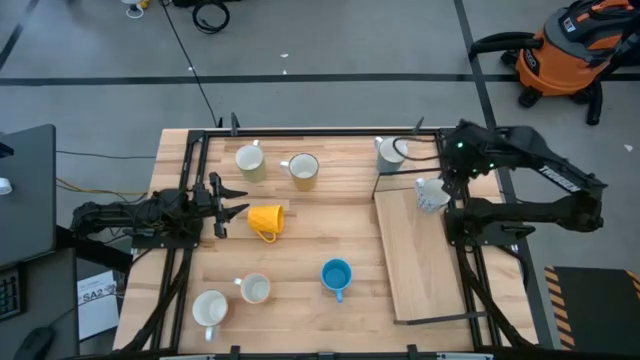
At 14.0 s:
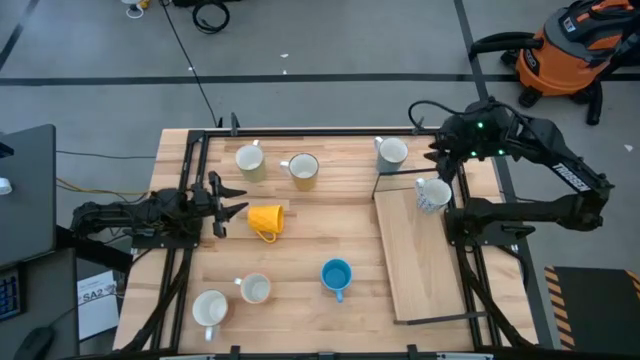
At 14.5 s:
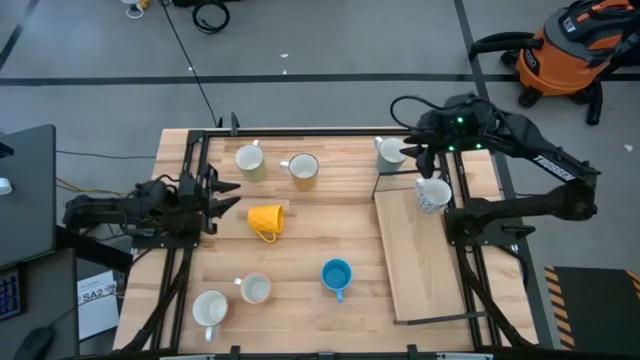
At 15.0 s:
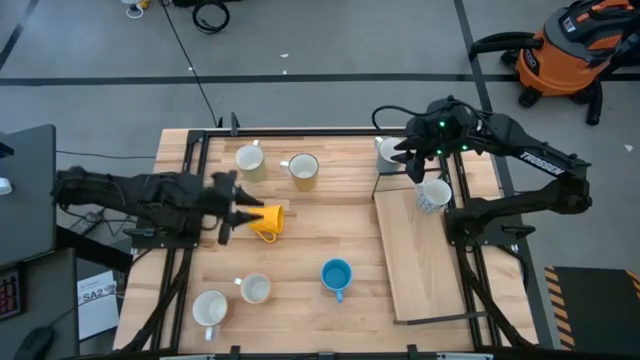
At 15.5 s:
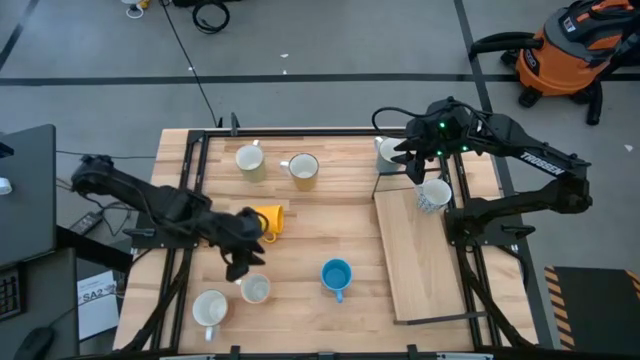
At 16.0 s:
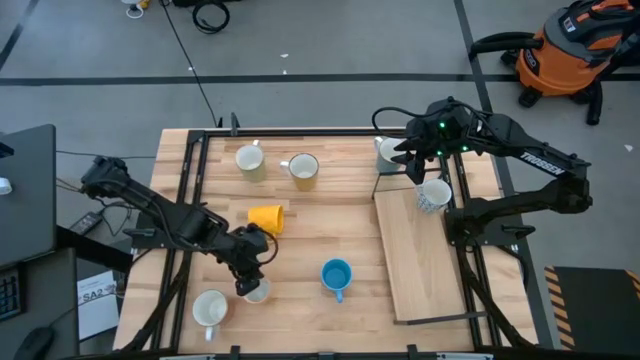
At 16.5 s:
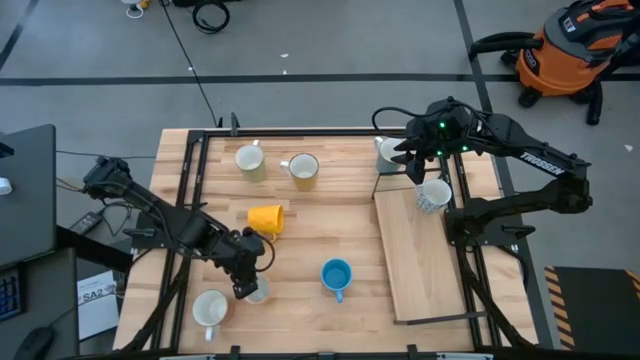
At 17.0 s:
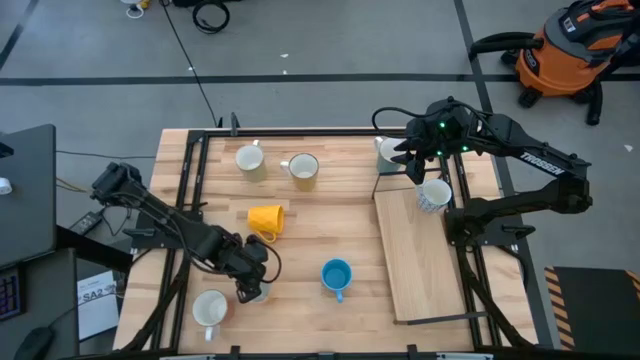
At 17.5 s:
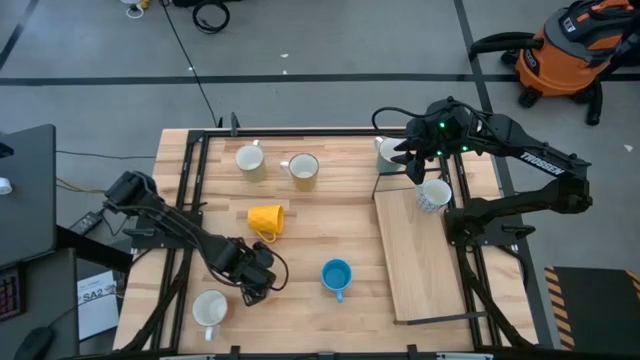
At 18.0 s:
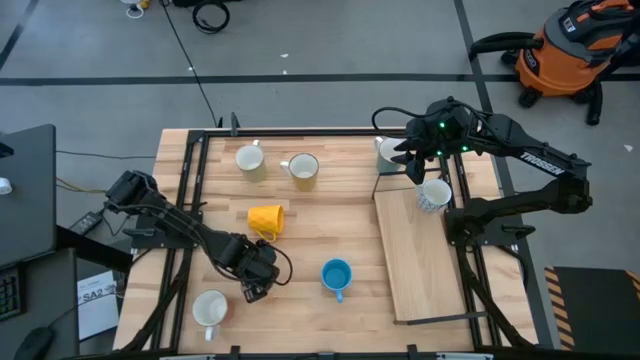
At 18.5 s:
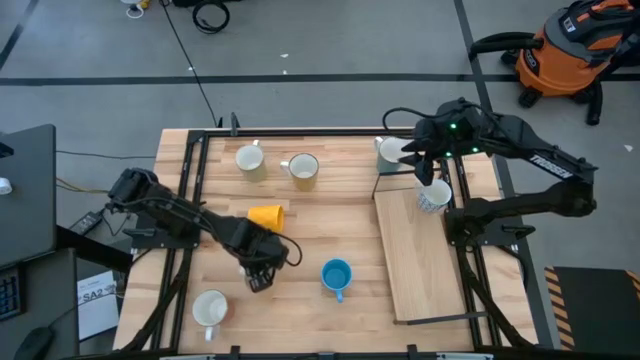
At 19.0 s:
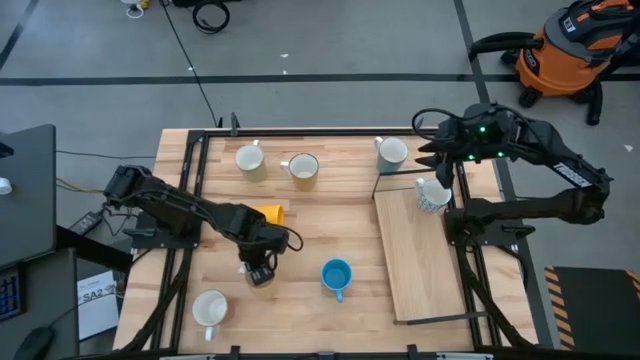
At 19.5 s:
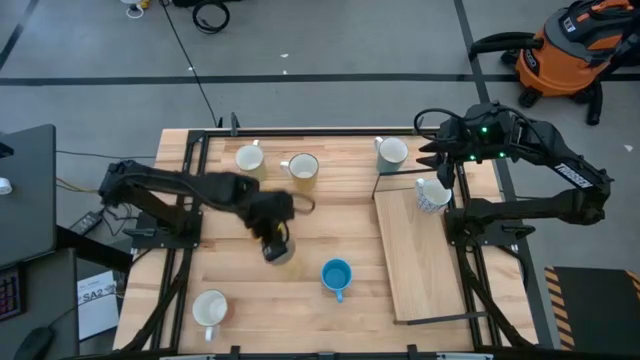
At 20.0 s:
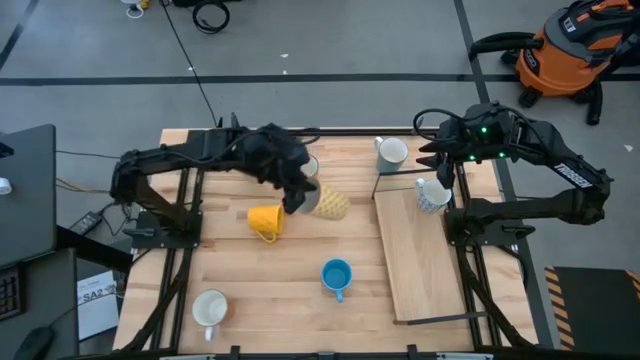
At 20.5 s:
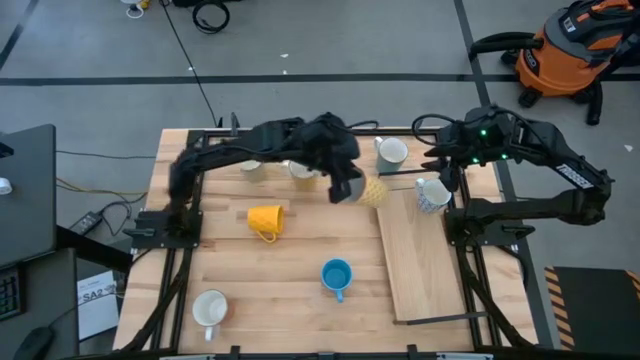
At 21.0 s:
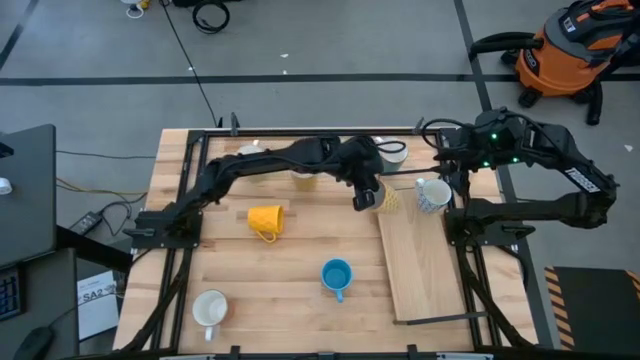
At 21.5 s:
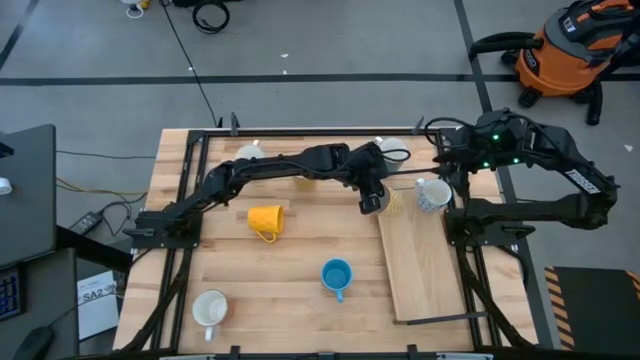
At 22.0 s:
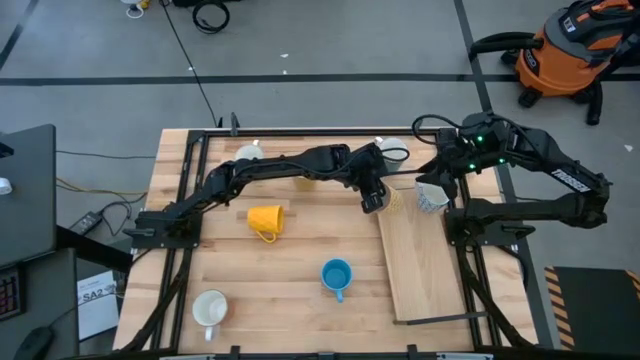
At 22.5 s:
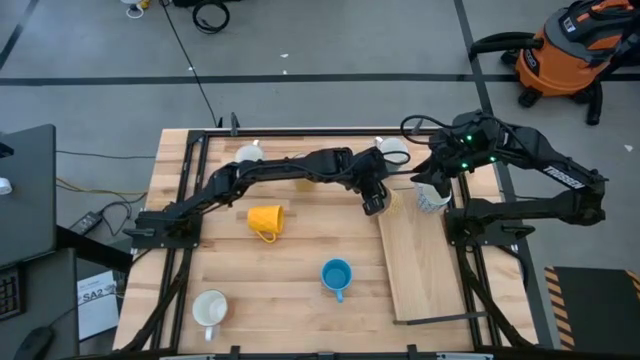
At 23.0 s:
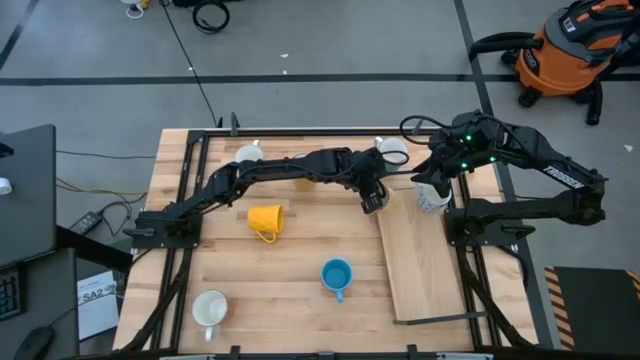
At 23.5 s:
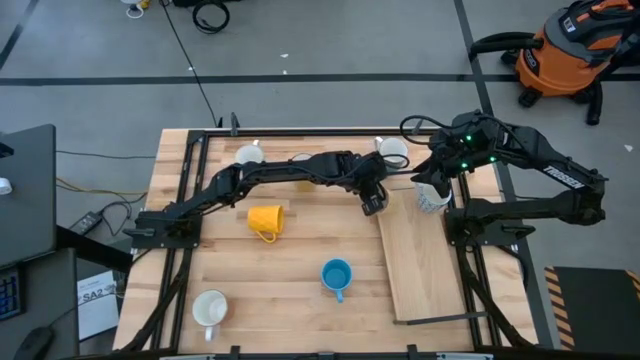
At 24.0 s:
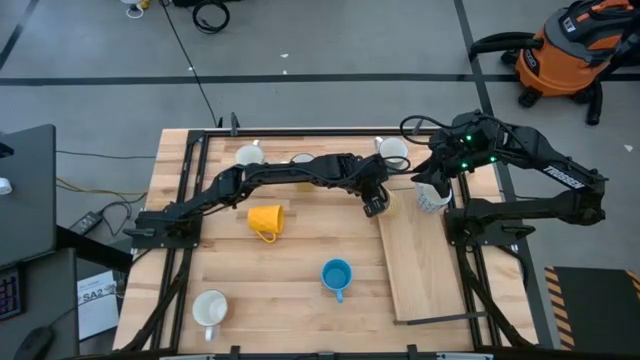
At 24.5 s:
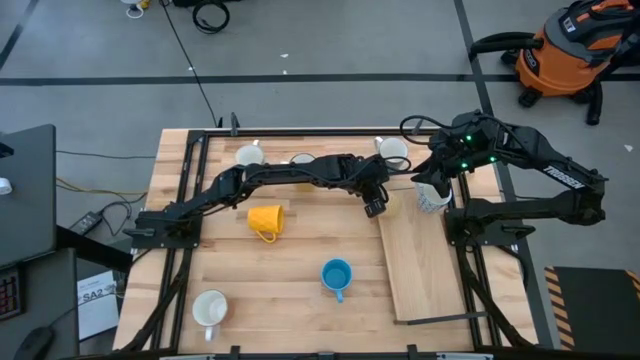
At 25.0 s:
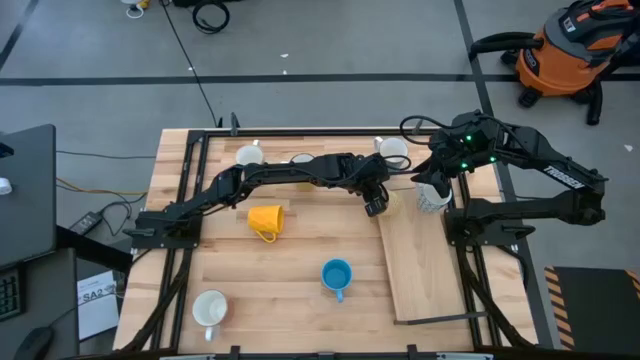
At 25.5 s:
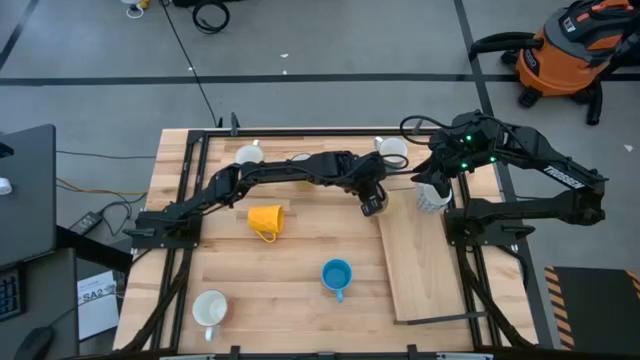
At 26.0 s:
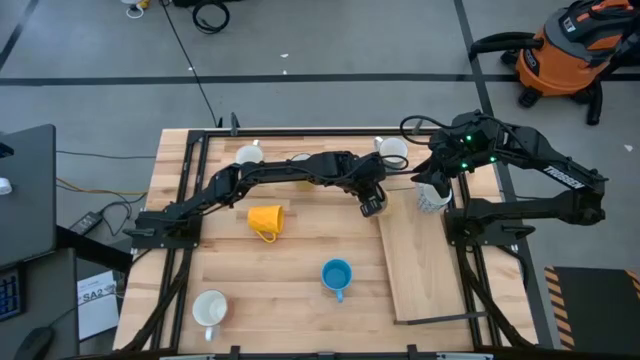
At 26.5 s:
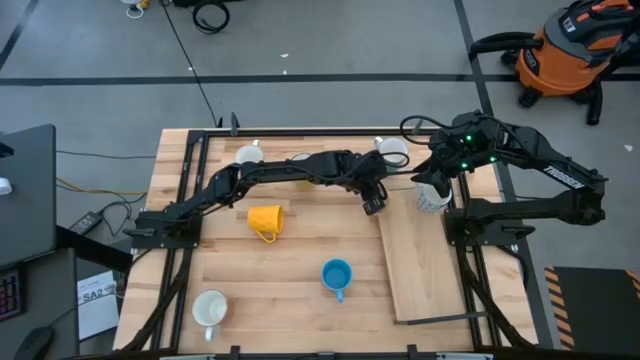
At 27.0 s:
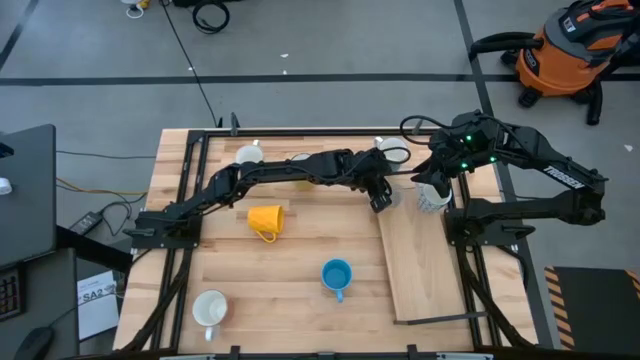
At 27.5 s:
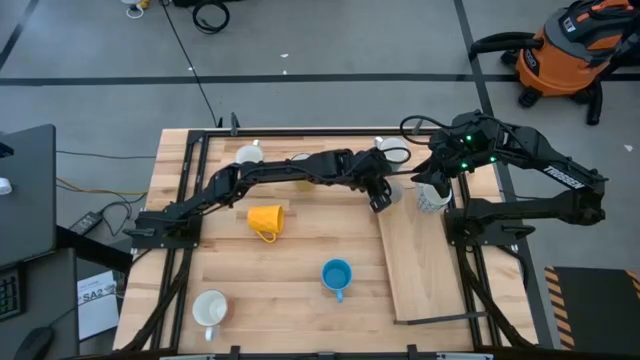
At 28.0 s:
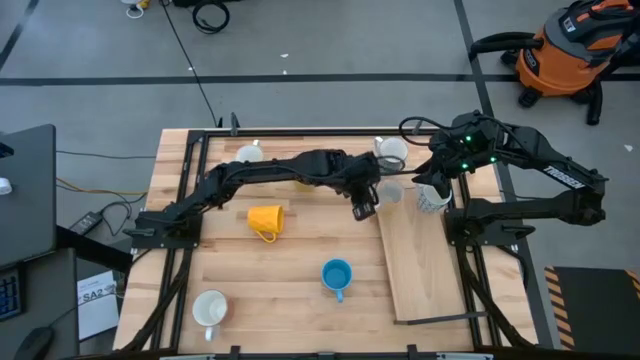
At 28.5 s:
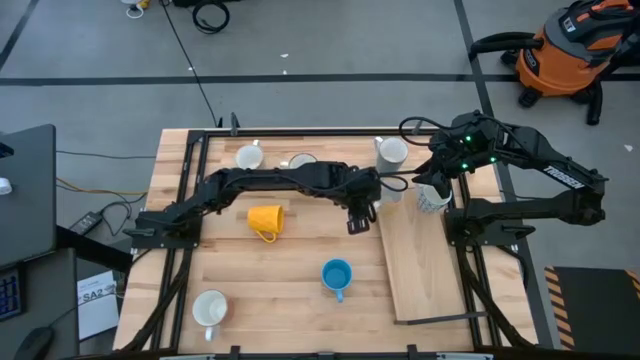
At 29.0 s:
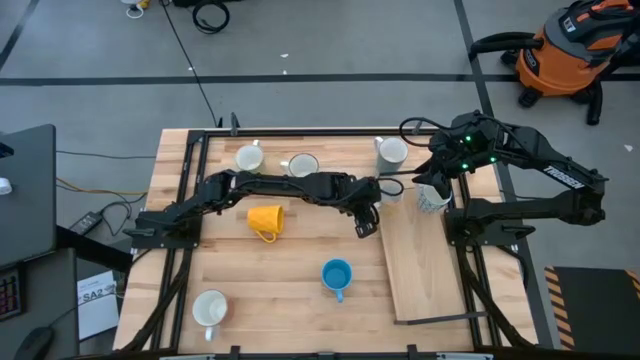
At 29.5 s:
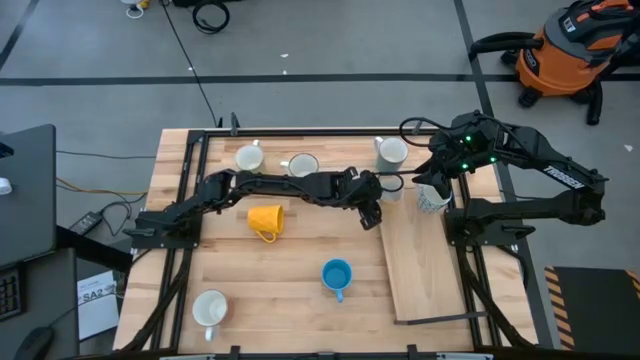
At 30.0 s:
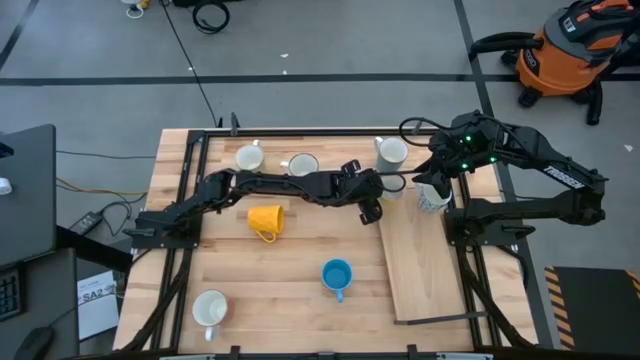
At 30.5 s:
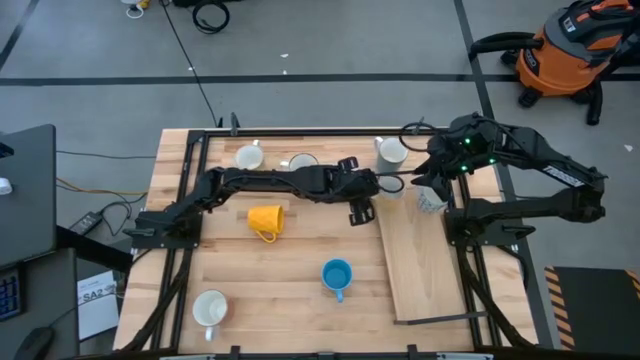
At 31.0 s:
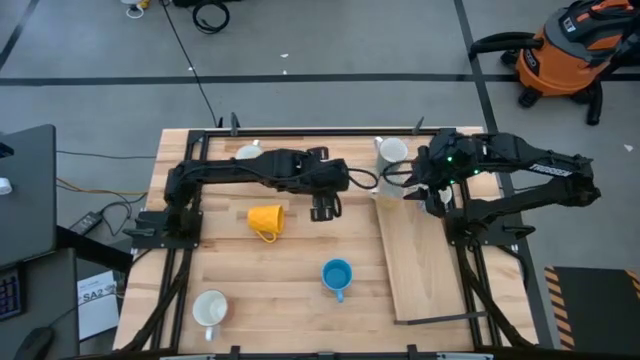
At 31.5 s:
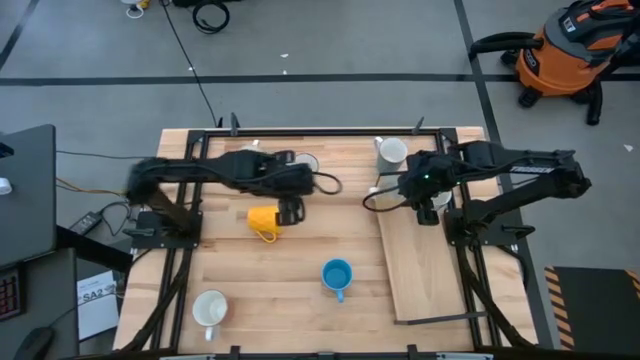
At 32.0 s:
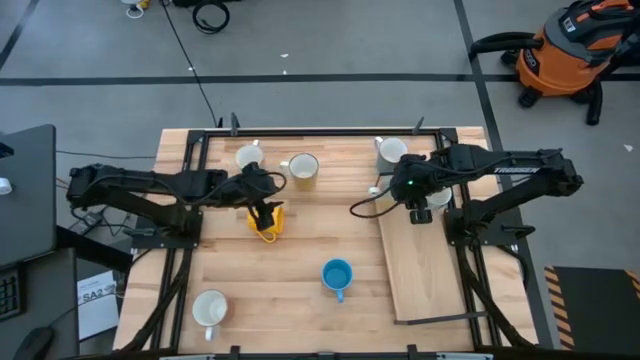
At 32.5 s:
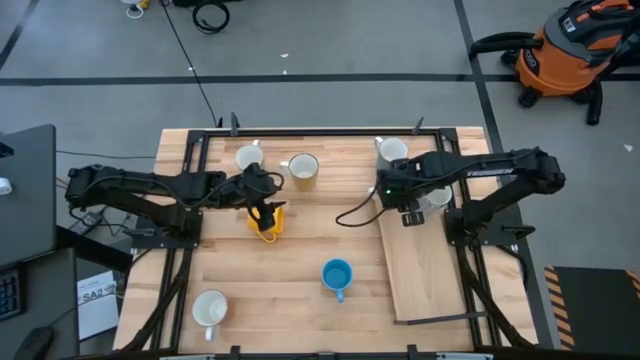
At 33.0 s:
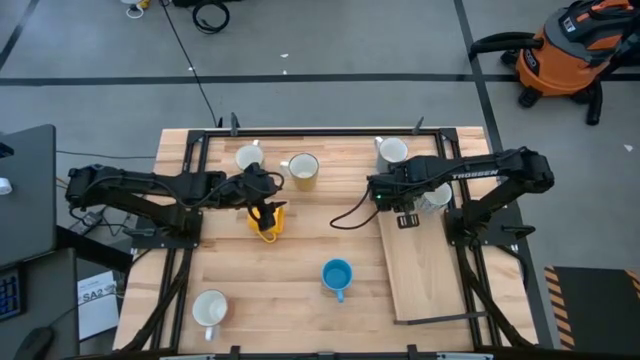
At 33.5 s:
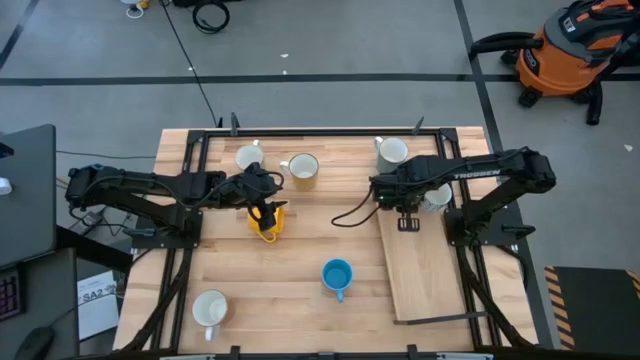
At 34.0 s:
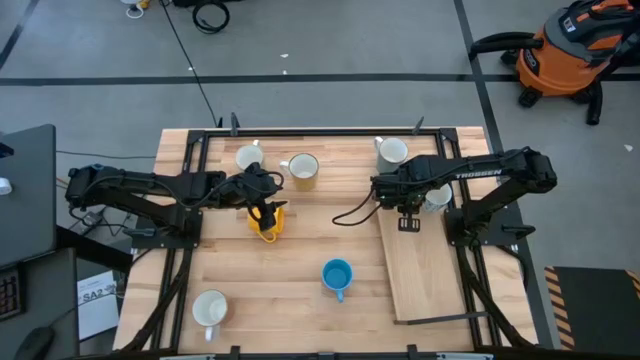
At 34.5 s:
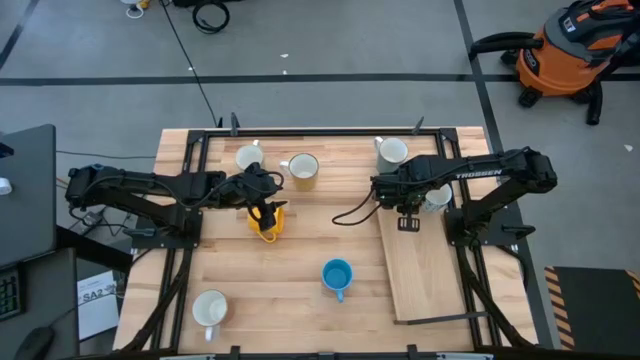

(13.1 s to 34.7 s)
Task: Place coffee mugs
Put the yellow patterned mug on the shelf
